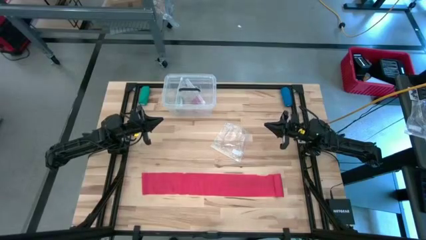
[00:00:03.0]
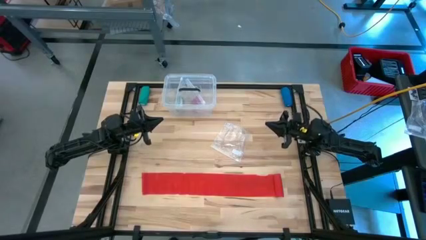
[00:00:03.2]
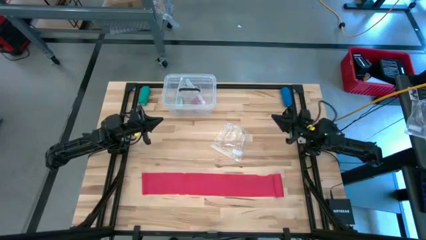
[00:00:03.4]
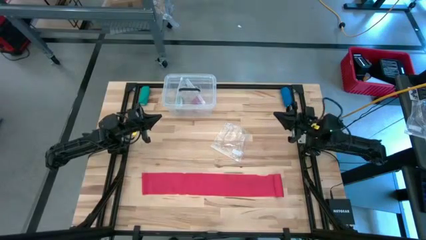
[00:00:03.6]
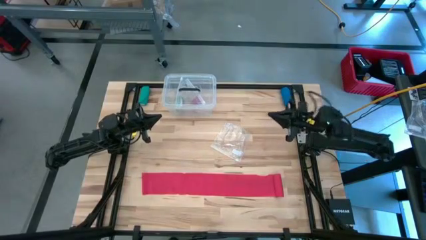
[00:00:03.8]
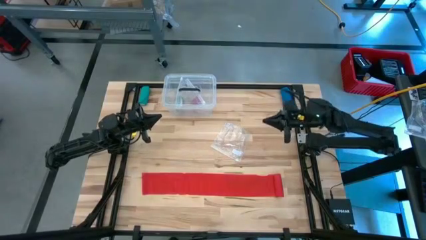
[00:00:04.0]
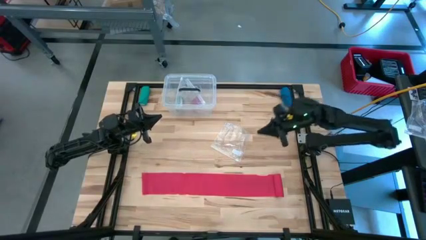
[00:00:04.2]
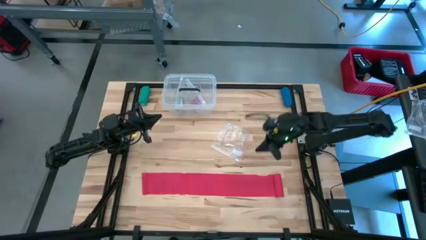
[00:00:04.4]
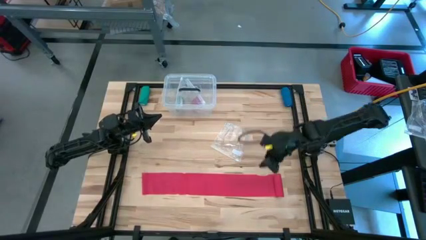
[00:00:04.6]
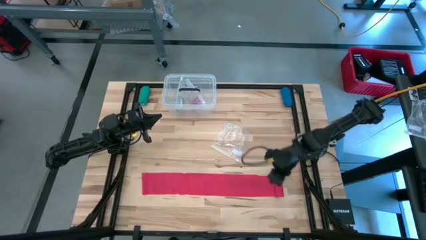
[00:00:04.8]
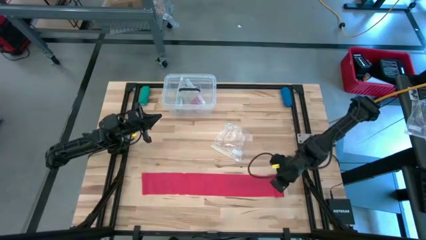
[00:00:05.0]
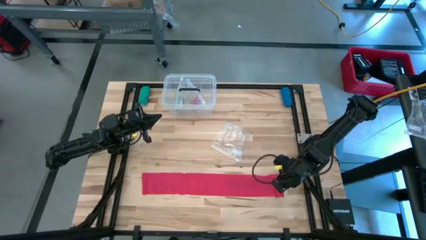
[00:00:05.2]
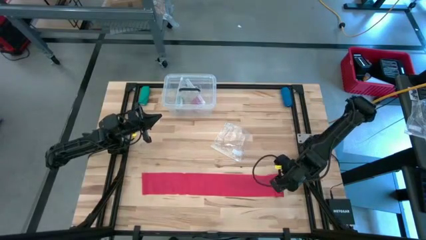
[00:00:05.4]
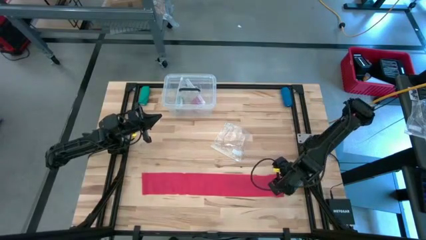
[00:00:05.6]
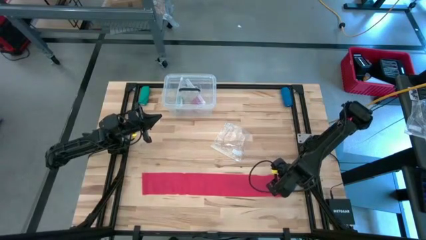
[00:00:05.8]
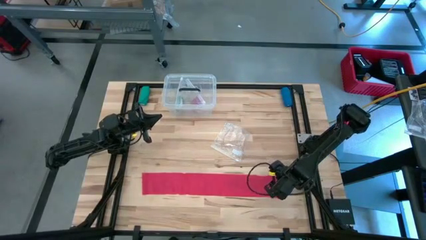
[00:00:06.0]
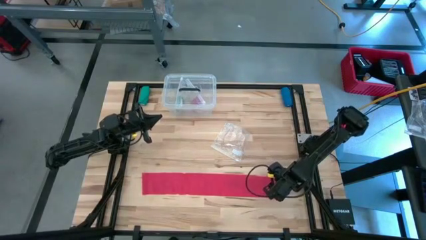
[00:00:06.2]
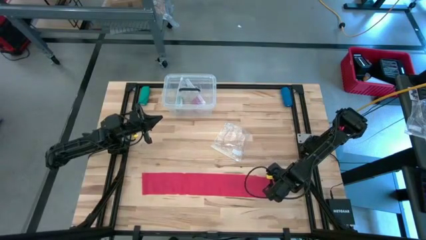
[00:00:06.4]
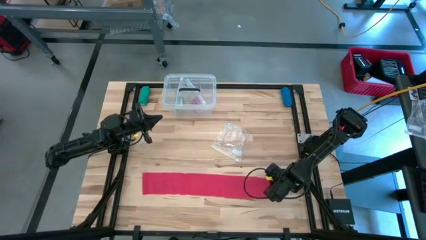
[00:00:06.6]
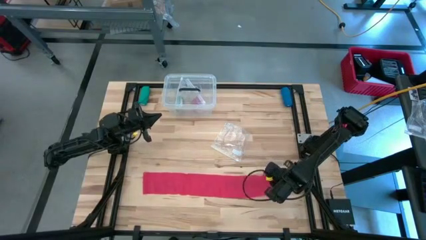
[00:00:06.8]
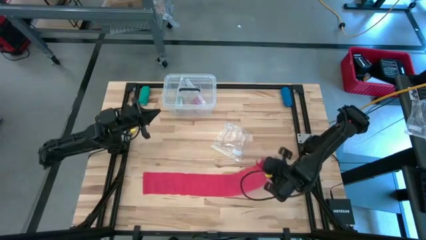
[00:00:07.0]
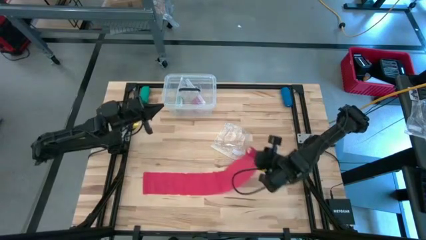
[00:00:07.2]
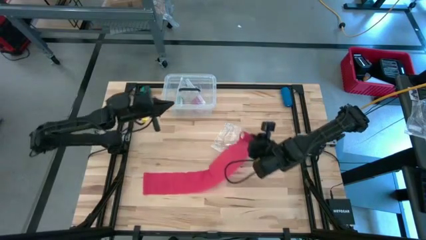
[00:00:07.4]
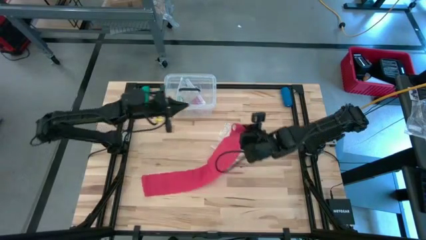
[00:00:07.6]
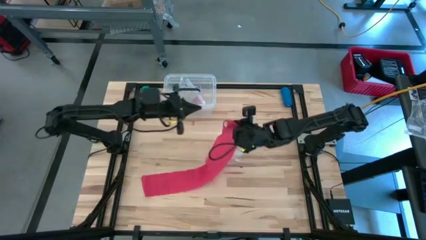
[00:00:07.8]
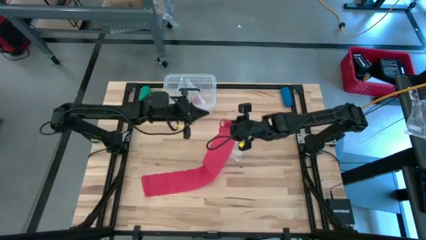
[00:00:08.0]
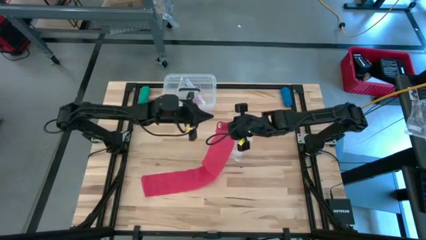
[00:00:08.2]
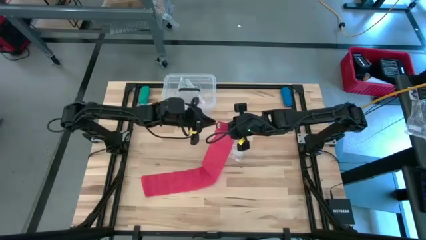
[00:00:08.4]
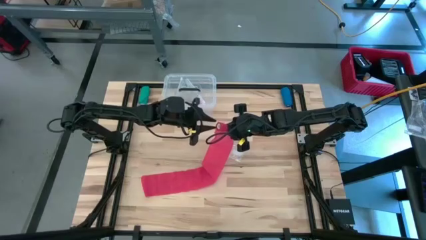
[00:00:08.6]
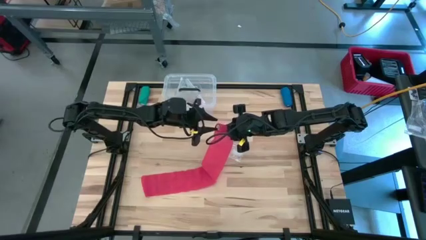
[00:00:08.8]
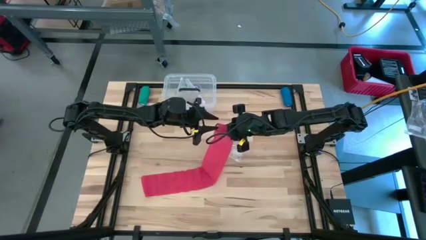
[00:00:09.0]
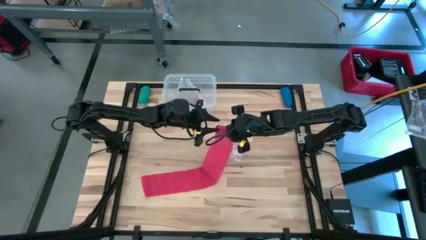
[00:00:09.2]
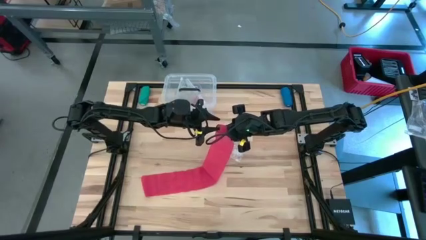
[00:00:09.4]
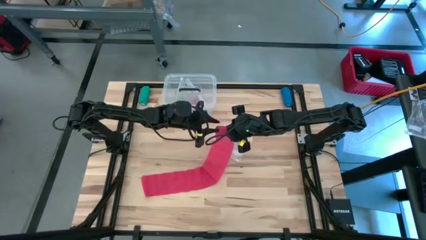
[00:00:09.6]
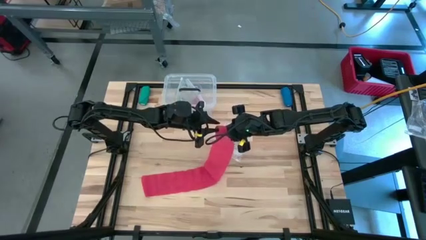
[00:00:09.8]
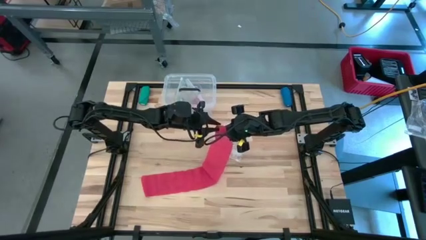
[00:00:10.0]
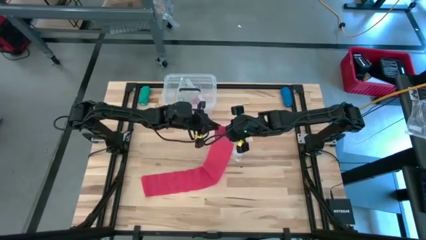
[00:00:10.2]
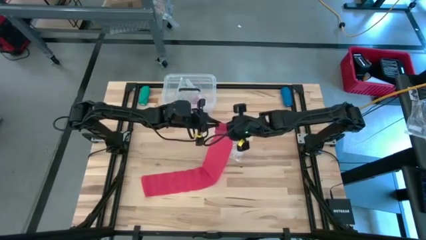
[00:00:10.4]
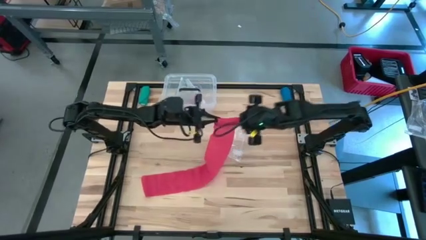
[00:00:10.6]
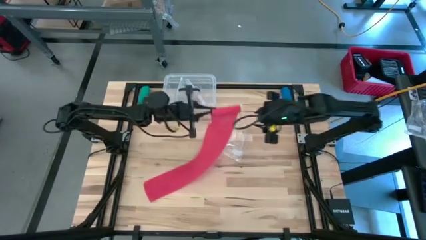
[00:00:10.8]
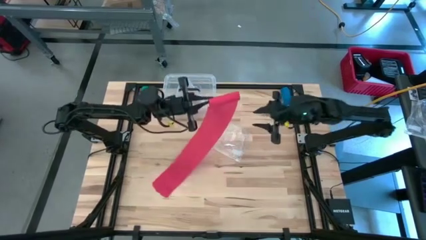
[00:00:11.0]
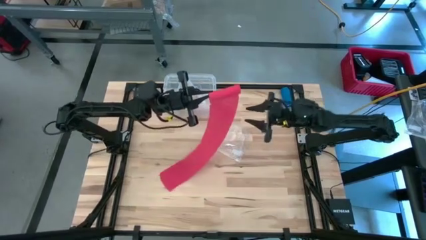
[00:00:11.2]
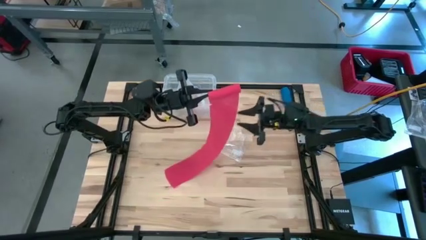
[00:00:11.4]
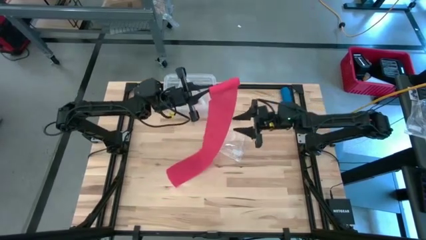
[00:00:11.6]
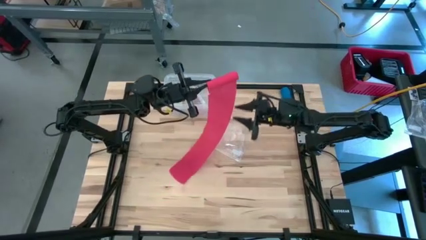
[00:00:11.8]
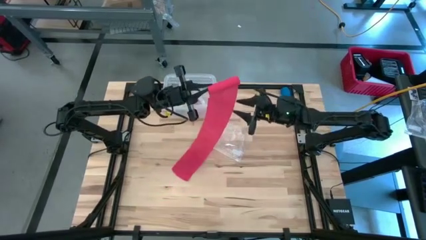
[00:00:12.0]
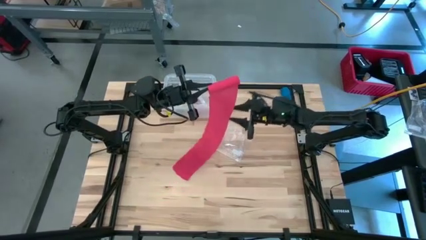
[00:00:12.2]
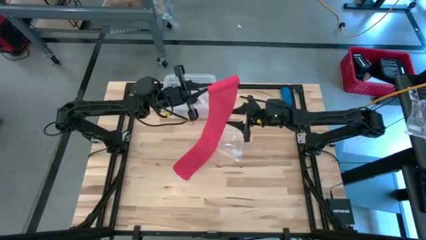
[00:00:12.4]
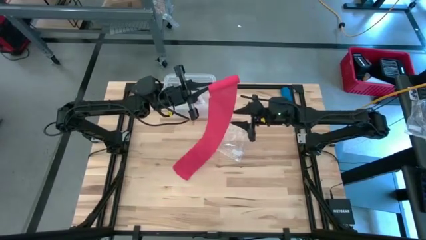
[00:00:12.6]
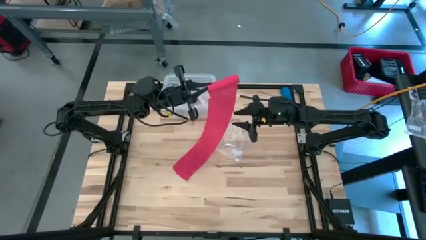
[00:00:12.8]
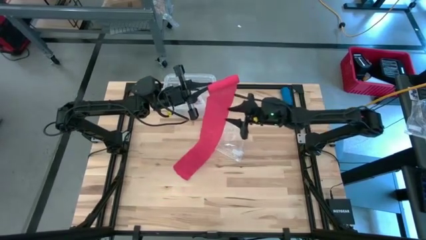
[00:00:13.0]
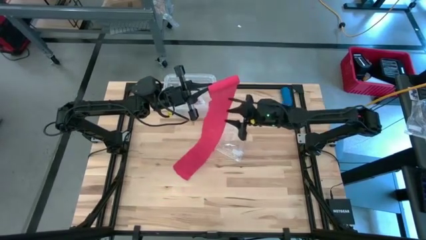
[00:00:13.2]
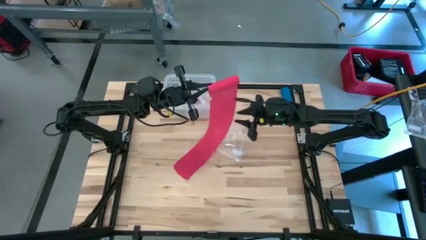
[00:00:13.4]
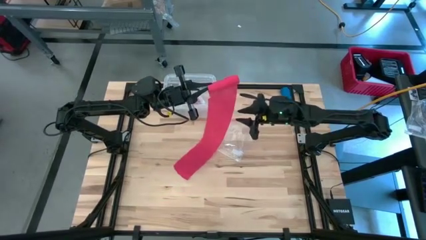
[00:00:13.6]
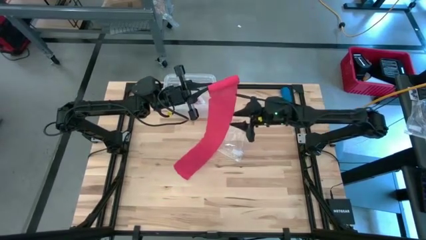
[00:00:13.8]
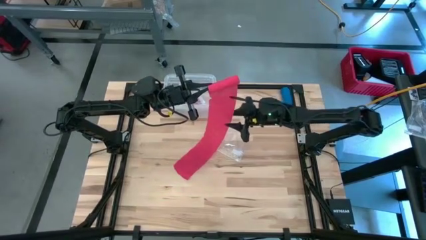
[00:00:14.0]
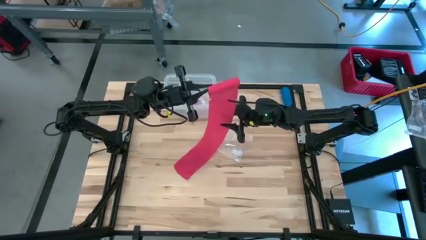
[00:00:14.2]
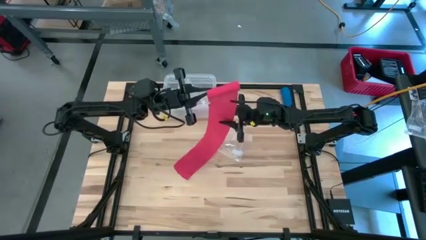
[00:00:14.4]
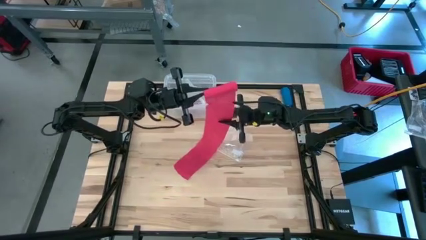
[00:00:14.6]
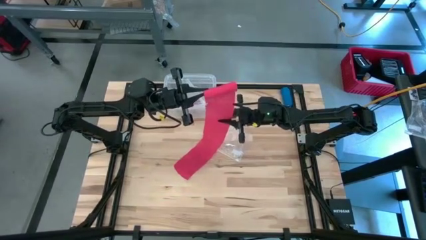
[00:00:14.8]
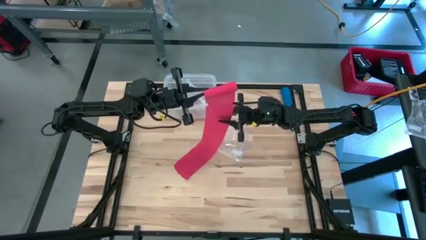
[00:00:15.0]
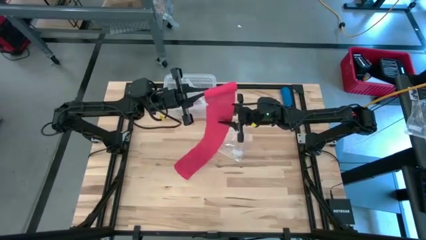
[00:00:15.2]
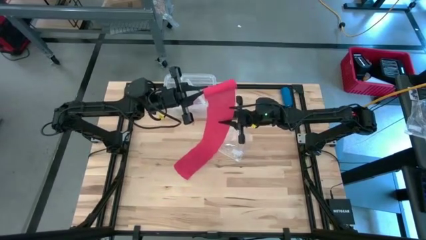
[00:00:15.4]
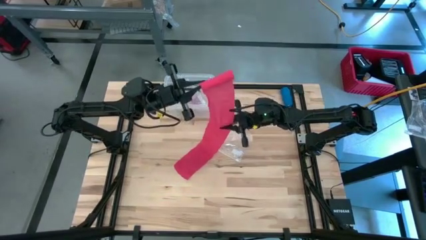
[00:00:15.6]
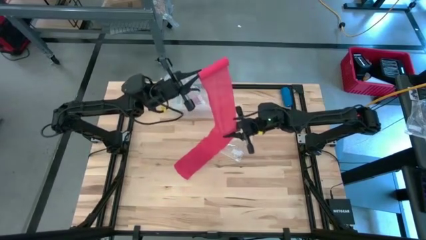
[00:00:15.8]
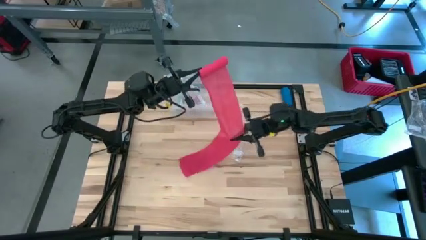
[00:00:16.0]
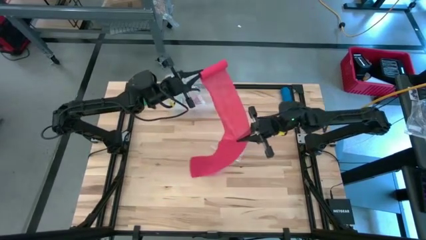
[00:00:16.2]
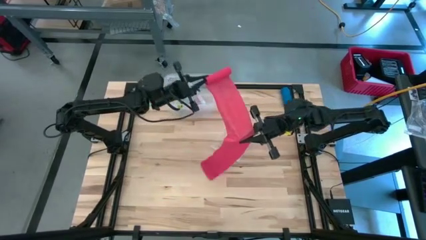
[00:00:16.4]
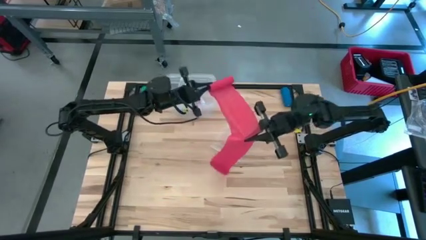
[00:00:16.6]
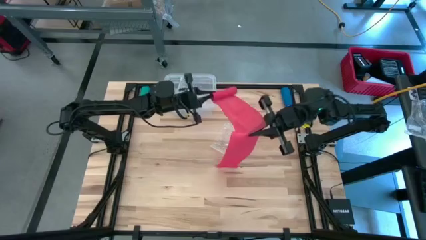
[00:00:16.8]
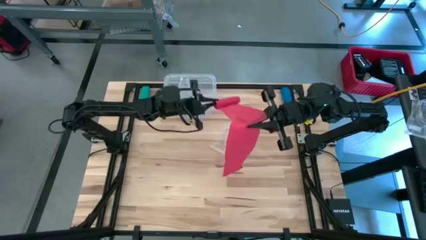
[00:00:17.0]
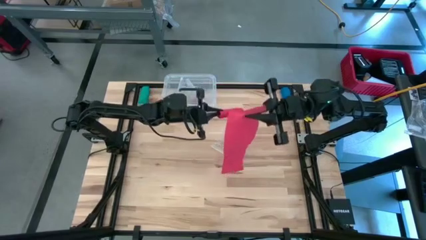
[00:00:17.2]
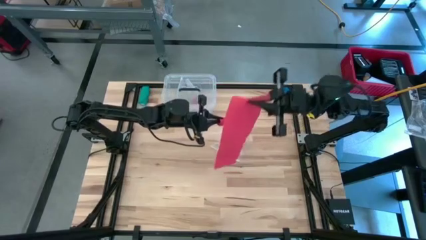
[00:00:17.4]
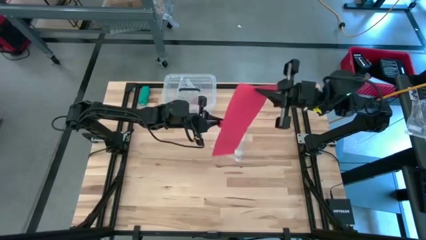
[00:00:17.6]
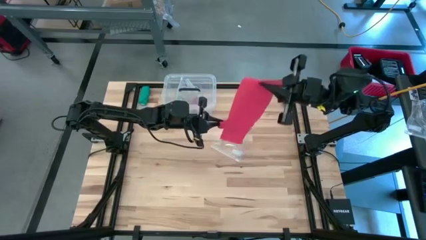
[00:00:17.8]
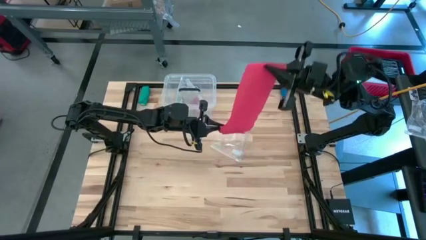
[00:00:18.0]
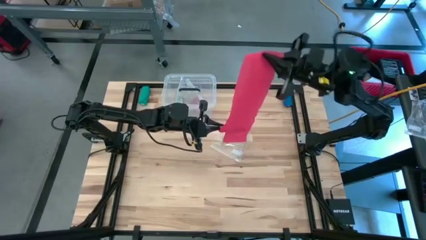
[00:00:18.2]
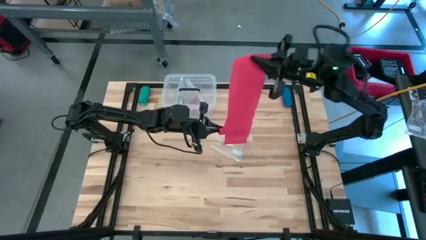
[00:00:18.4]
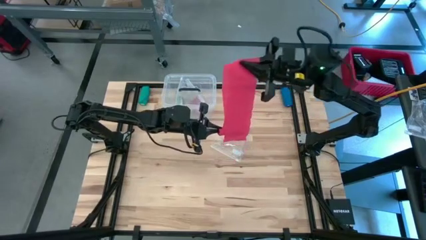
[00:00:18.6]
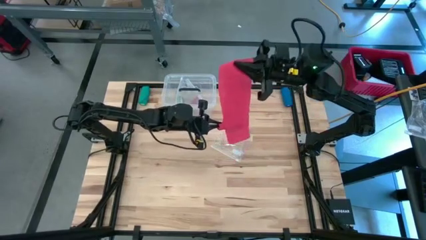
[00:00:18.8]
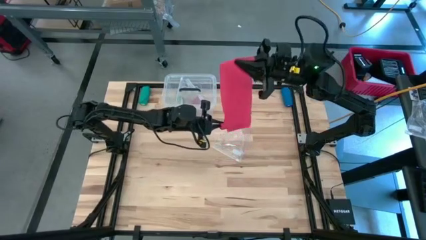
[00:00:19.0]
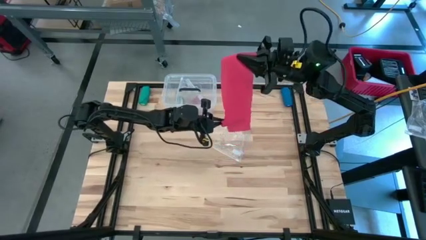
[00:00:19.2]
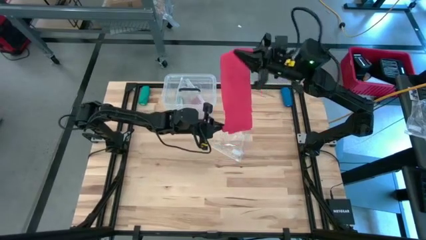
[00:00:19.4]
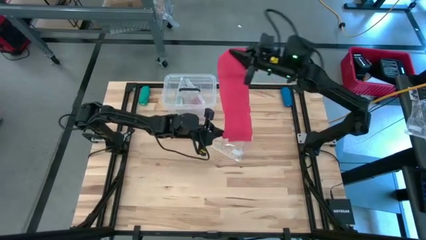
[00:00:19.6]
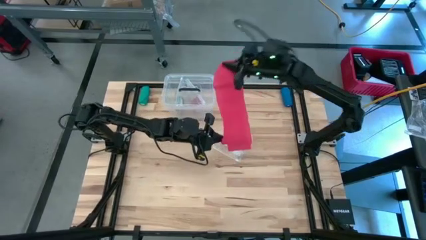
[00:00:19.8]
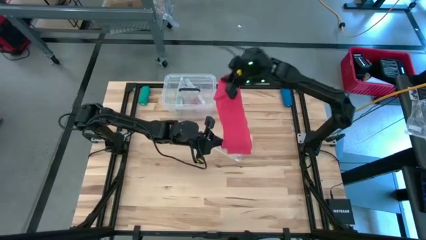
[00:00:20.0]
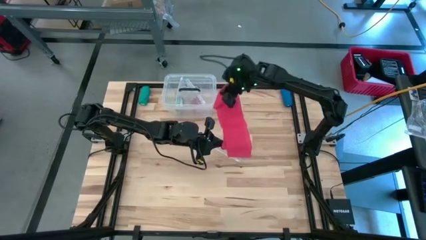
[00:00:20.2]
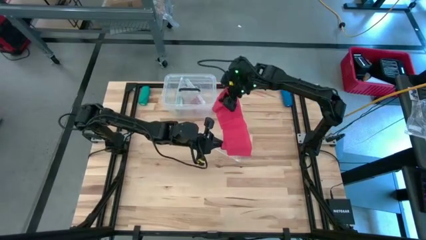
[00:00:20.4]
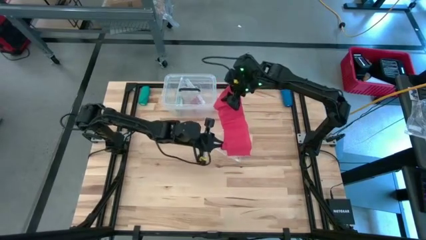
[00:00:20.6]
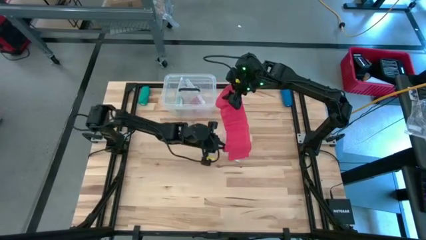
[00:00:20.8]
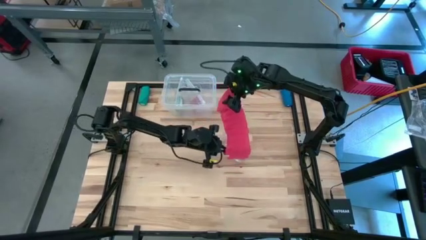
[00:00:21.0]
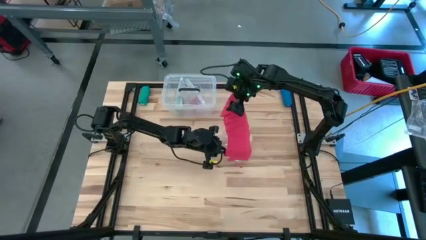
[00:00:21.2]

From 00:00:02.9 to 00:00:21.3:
Task: Roll bandage
Roll the red bandage
